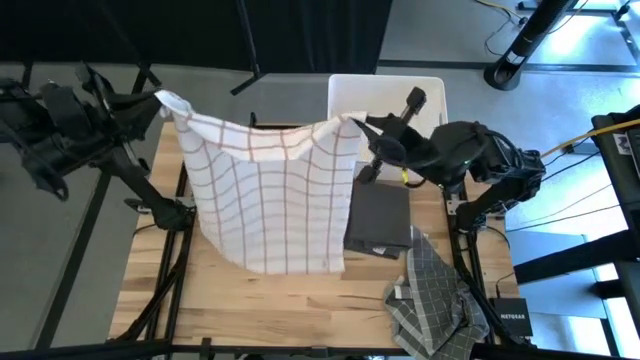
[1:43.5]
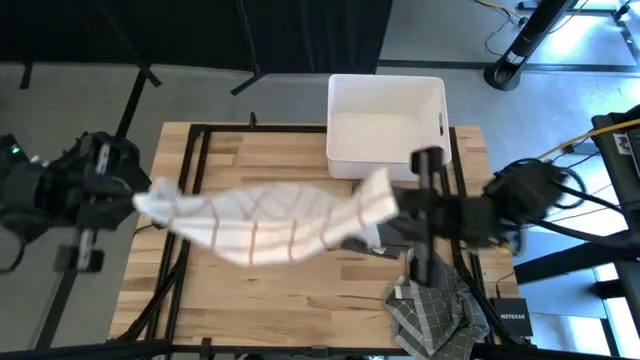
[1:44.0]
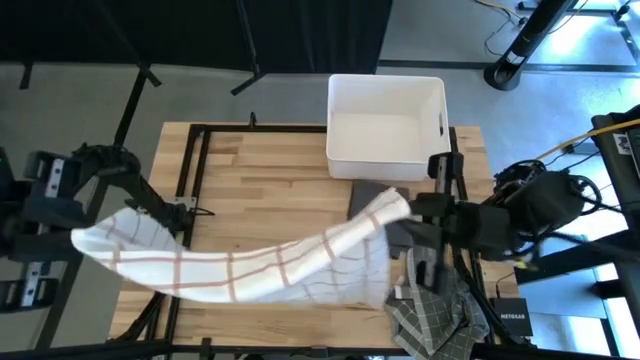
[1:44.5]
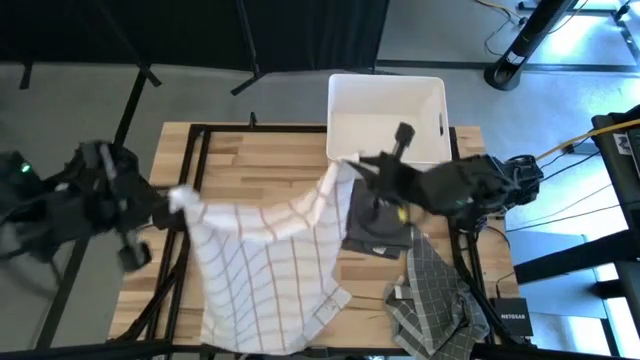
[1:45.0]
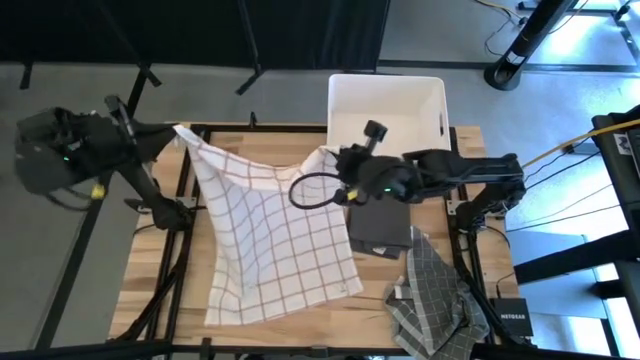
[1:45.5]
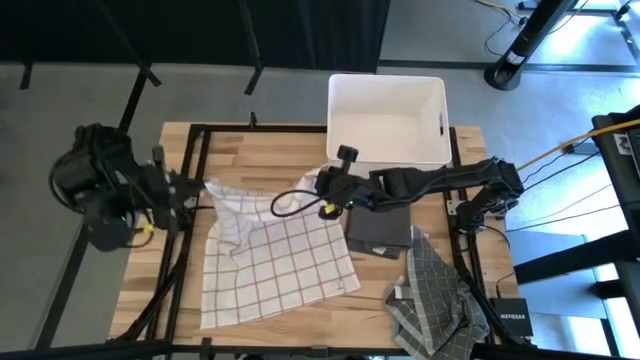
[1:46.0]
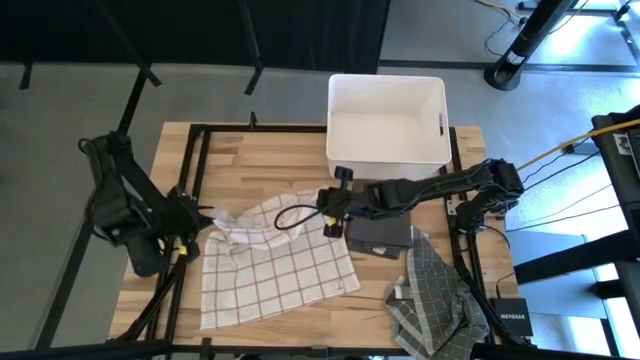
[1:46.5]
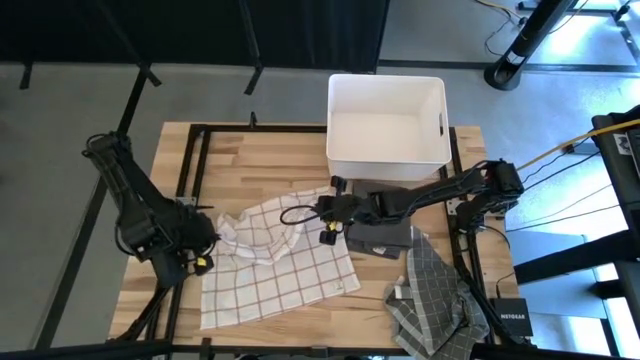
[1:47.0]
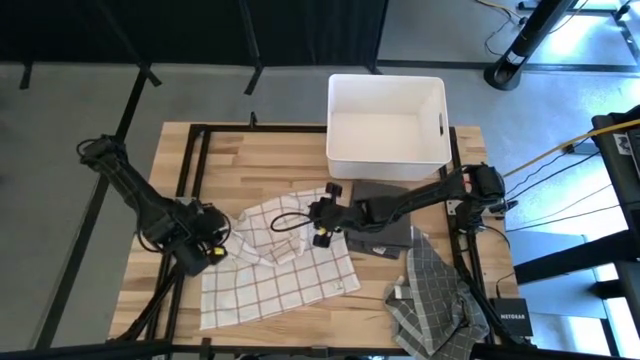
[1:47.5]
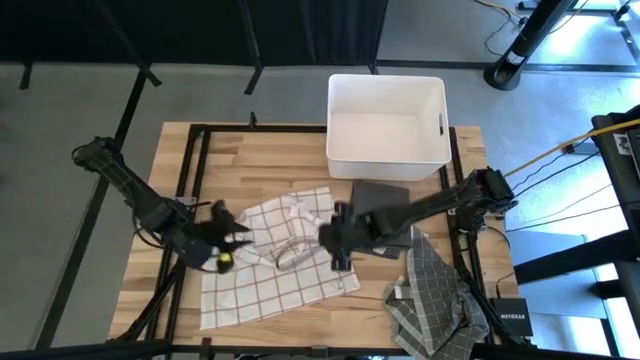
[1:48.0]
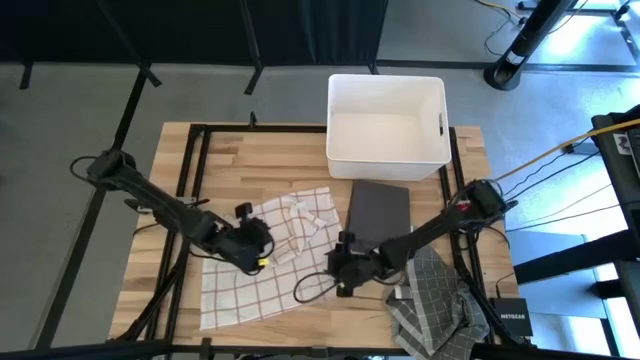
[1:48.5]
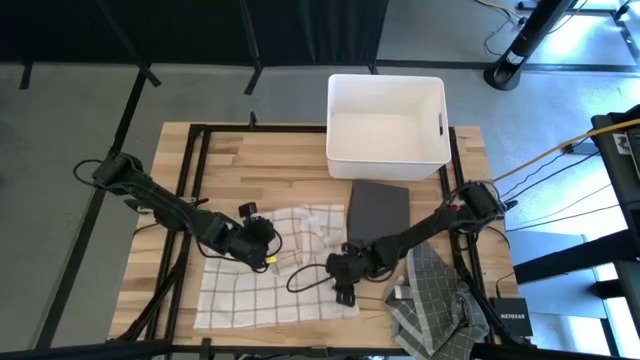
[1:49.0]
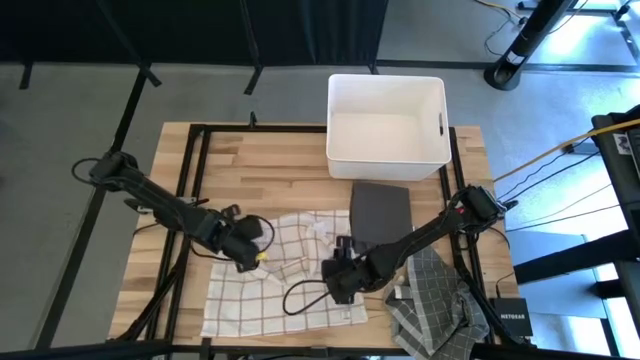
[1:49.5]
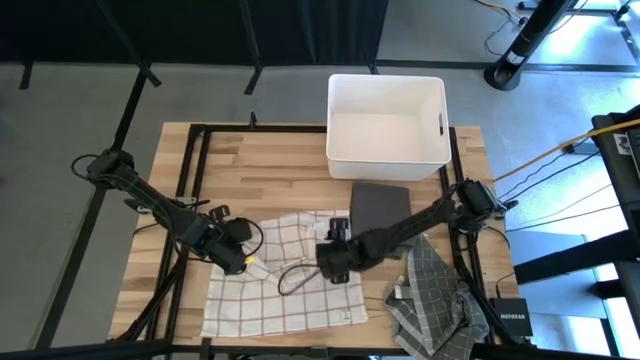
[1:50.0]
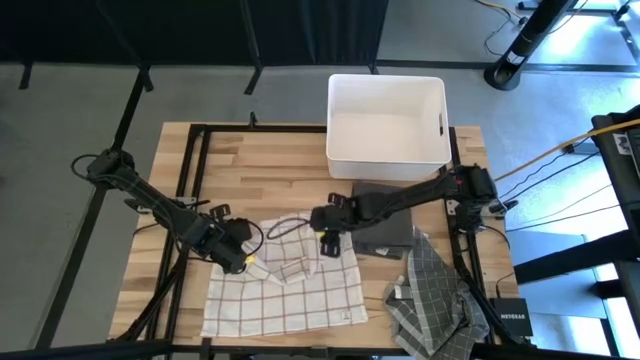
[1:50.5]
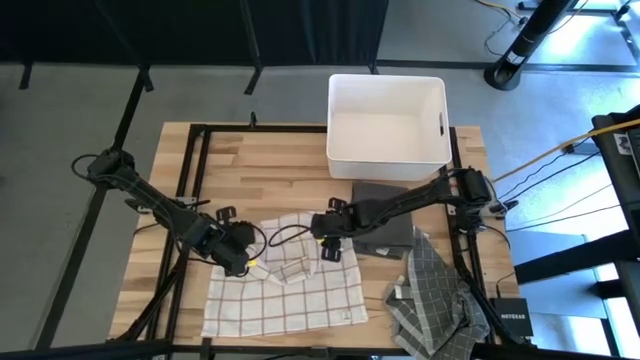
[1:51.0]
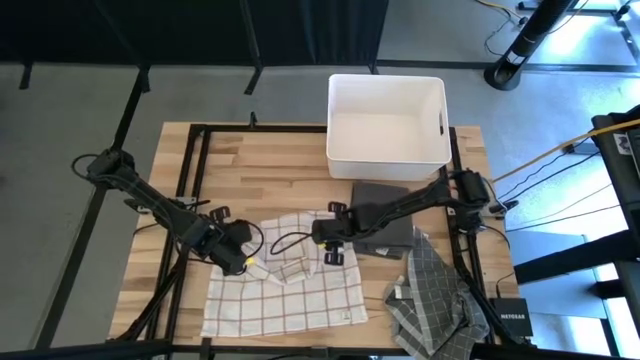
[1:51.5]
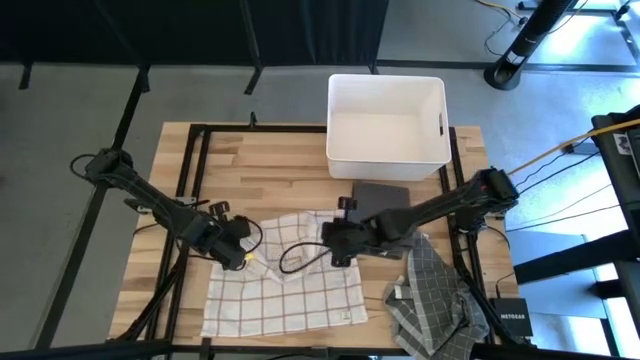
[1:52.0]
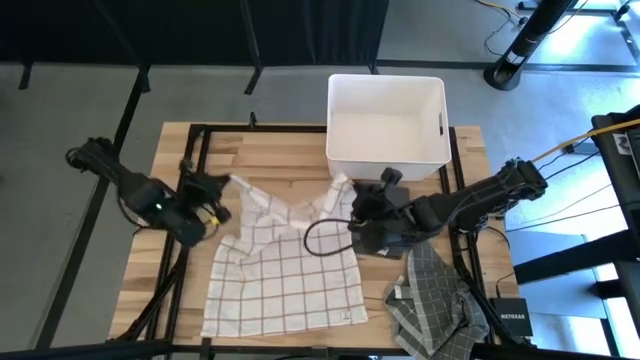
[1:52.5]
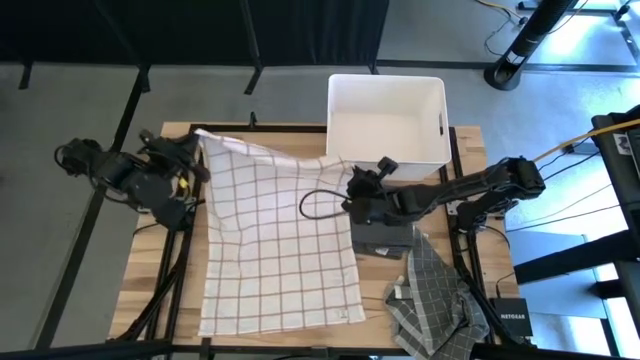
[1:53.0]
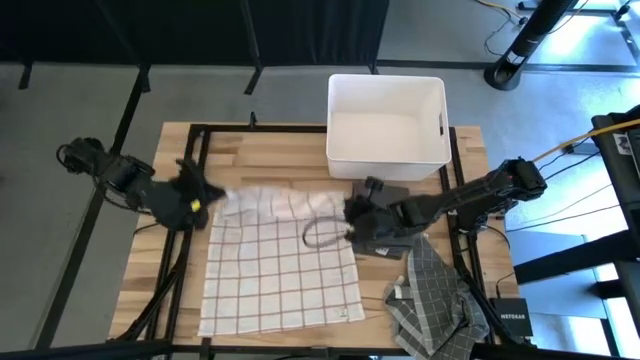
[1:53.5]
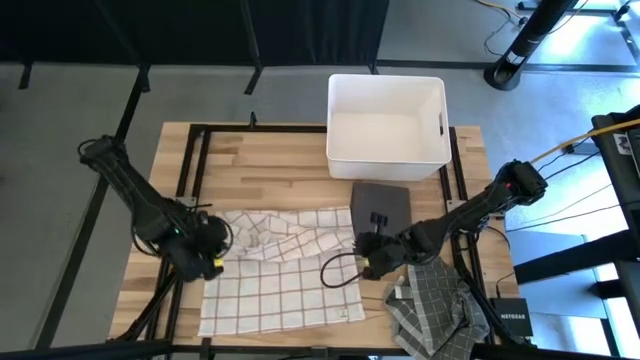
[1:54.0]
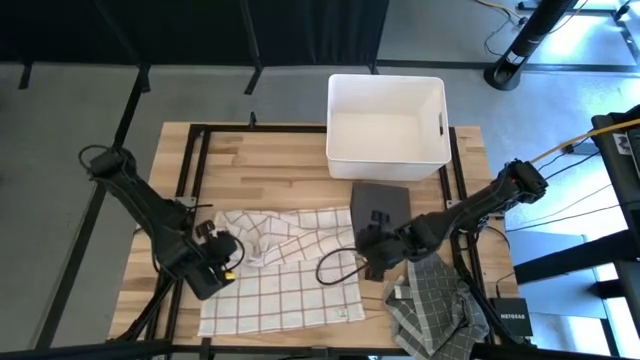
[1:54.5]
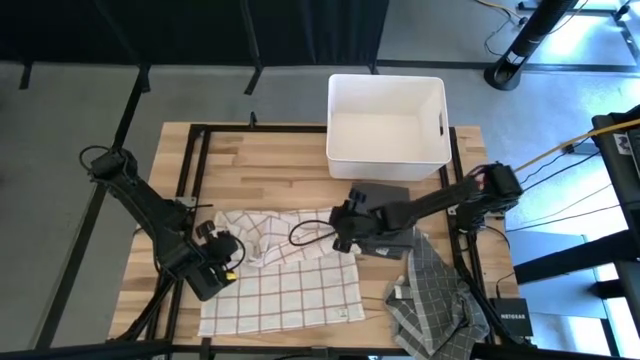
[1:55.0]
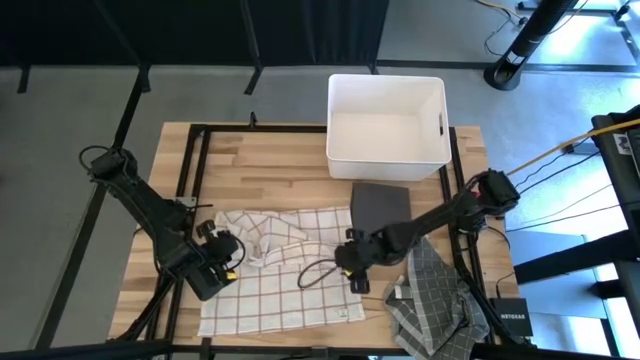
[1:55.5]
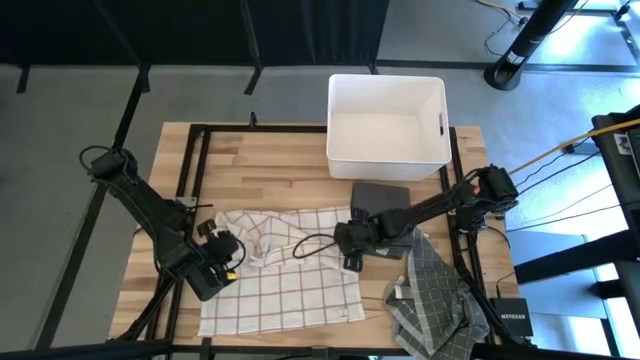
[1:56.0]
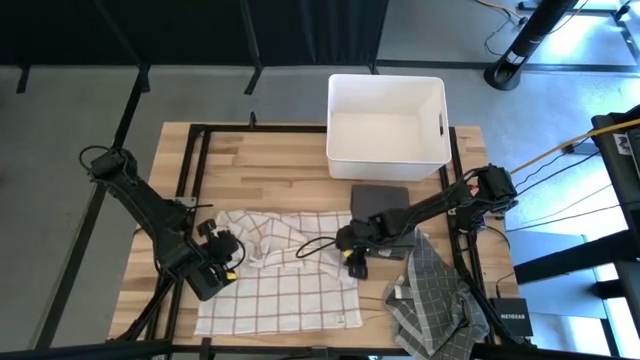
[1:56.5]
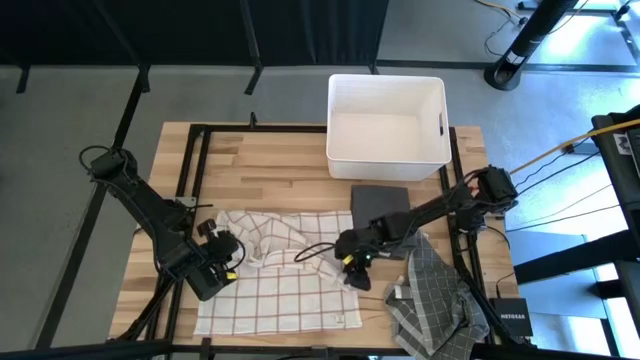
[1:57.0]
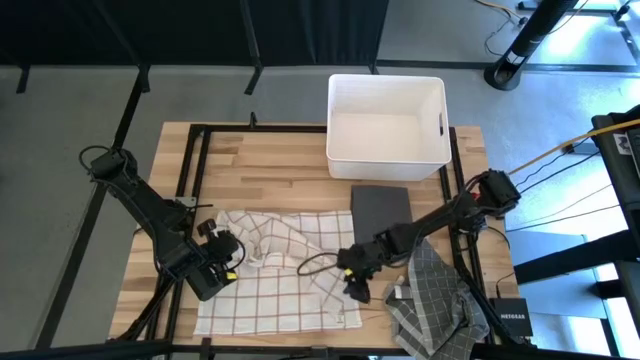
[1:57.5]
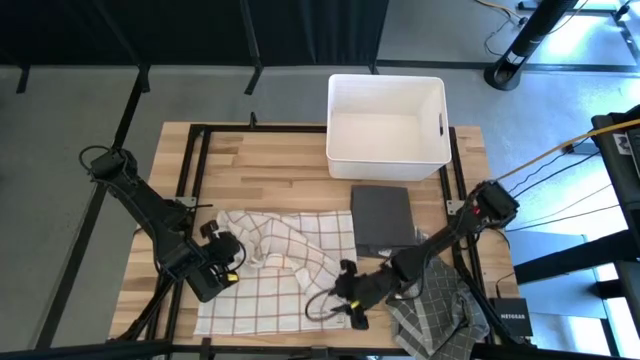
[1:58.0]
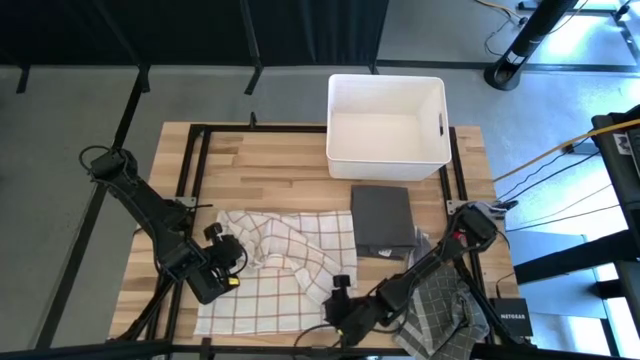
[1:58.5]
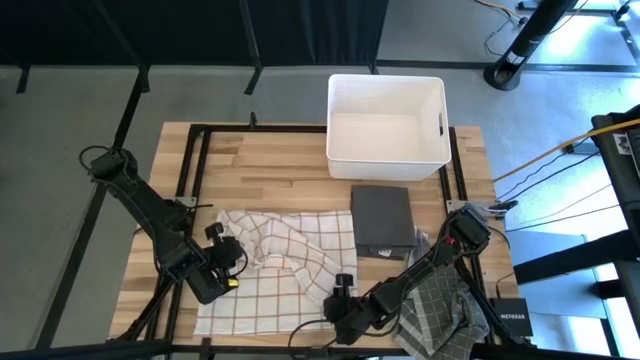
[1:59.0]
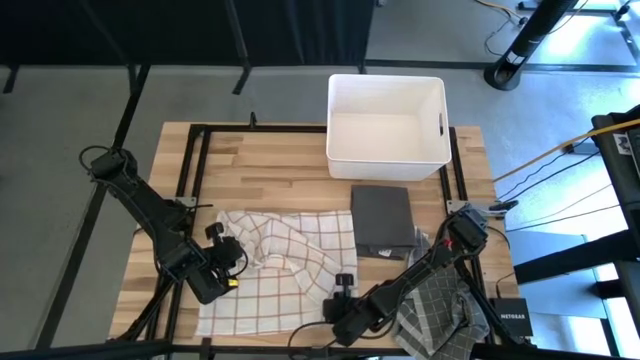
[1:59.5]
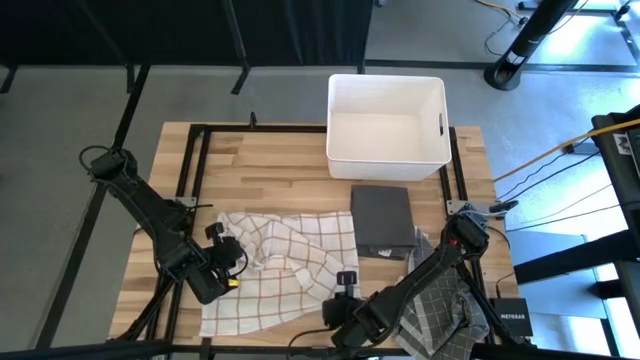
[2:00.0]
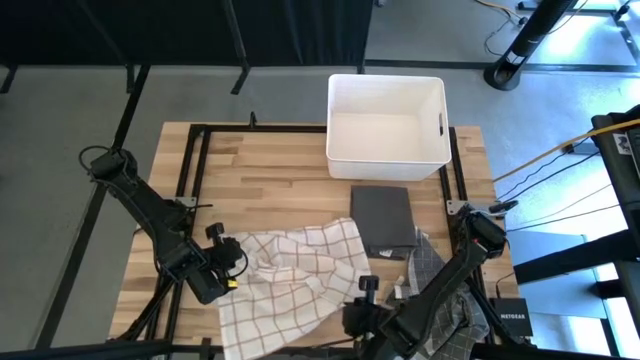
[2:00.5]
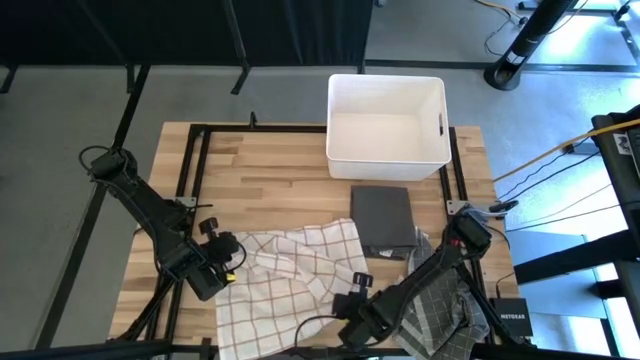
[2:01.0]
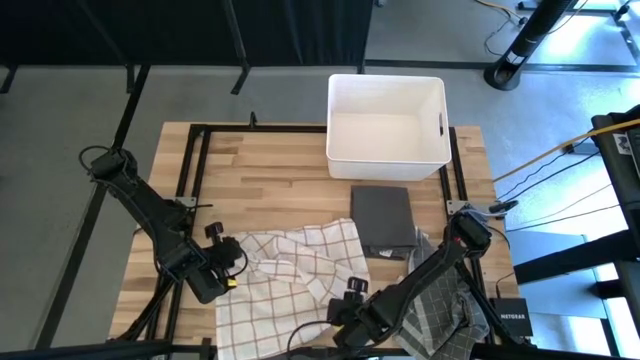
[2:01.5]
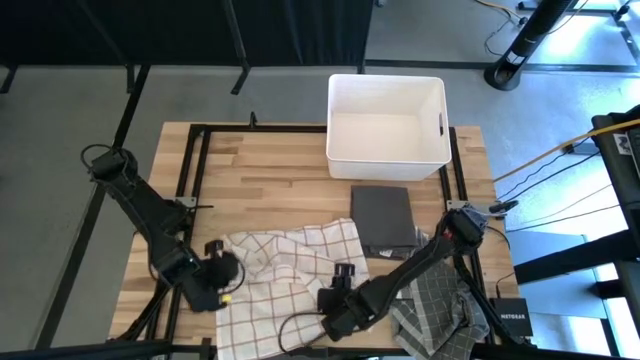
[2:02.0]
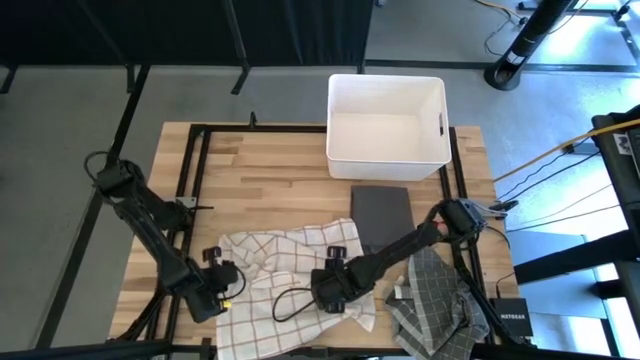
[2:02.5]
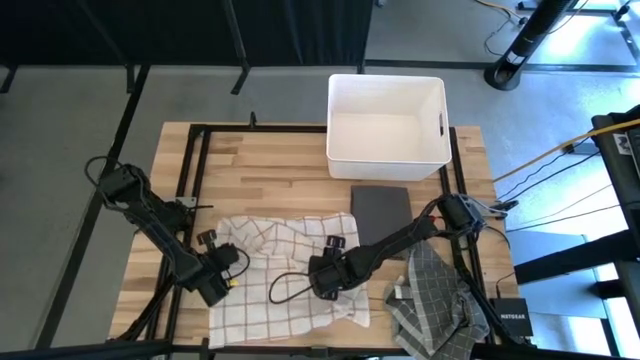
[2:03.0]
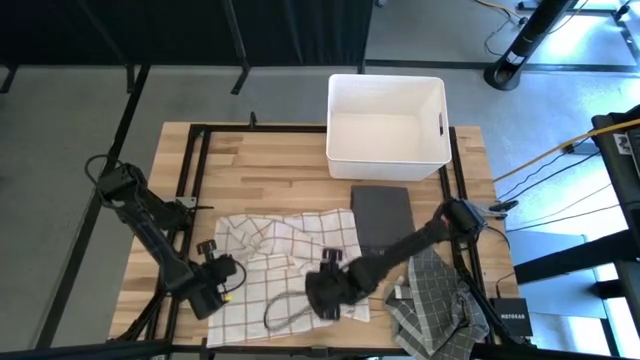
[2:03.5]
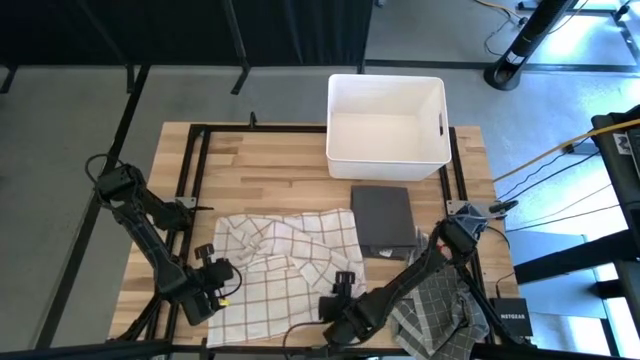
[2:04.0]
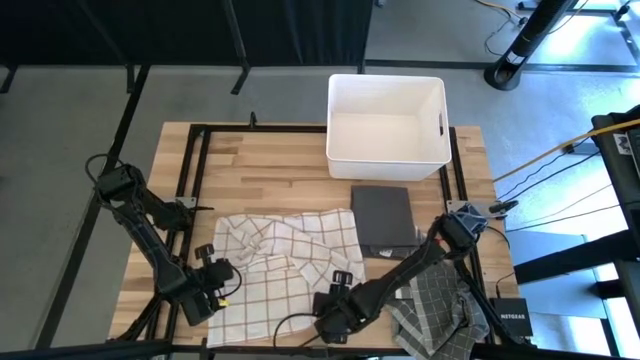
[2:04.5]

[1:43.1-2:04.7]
Task: Fold towel
Fold the white towel
